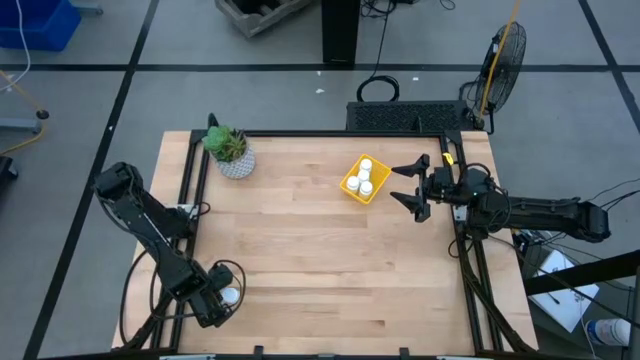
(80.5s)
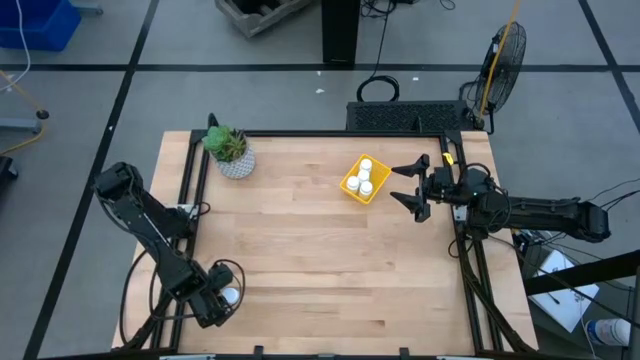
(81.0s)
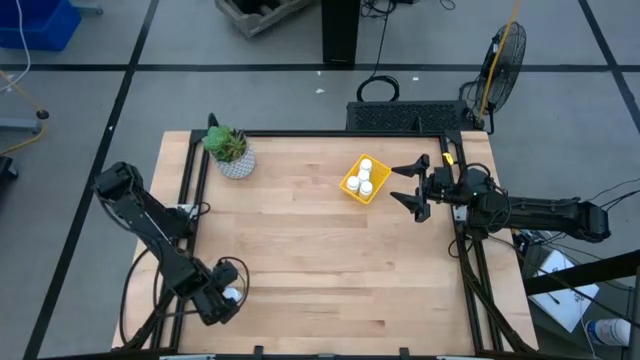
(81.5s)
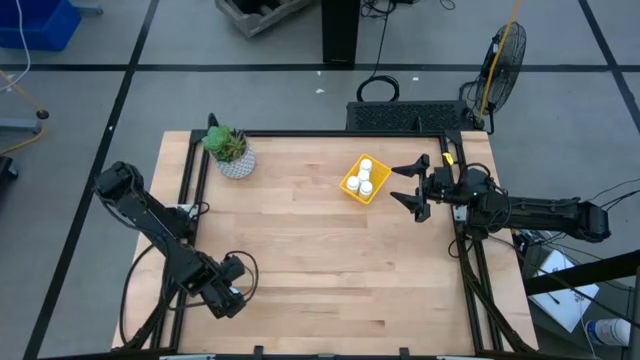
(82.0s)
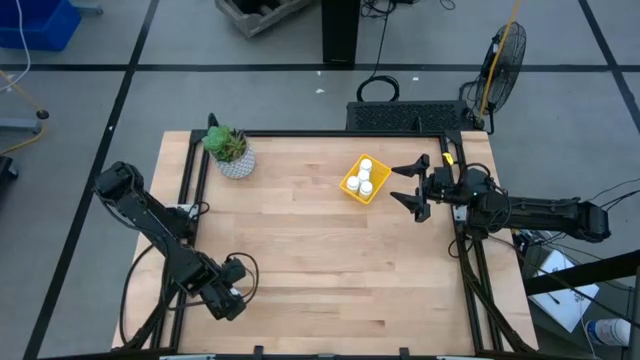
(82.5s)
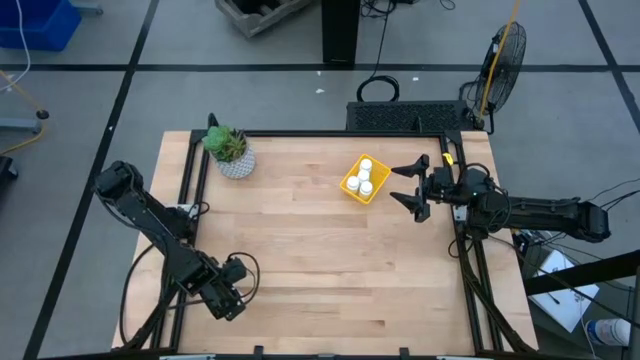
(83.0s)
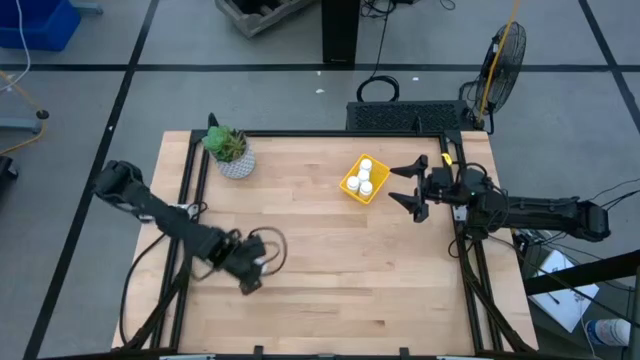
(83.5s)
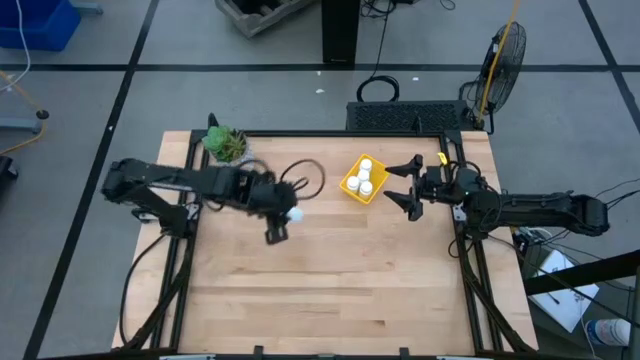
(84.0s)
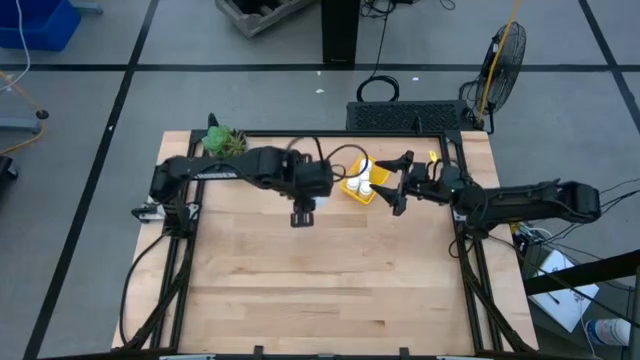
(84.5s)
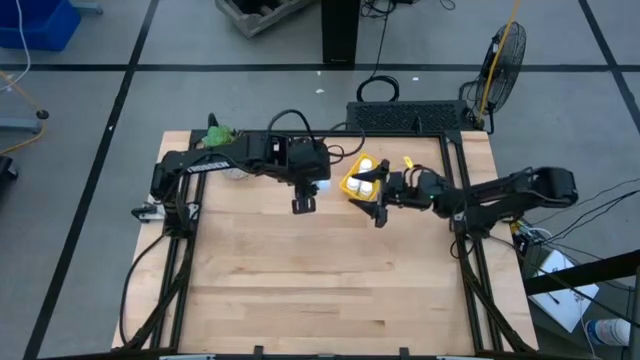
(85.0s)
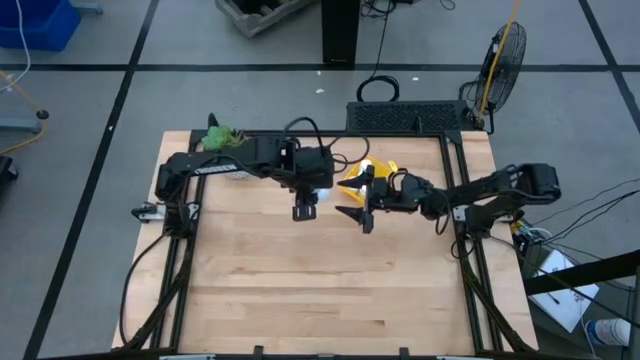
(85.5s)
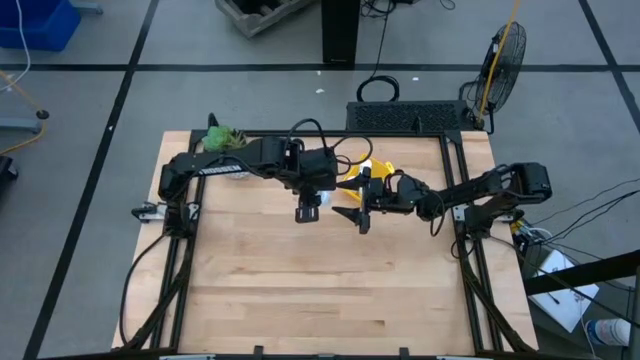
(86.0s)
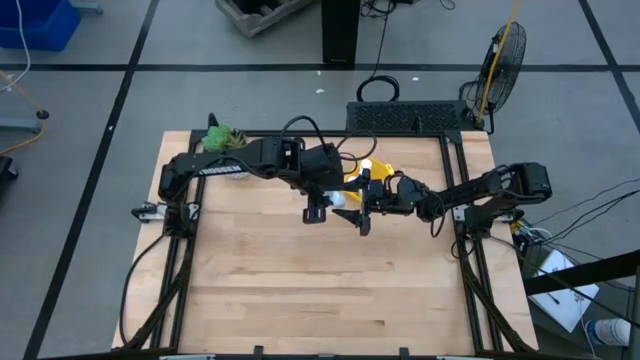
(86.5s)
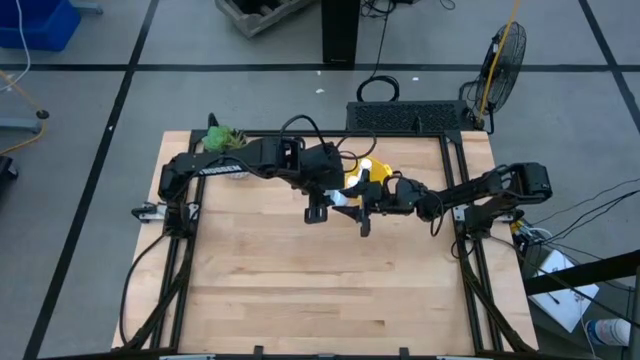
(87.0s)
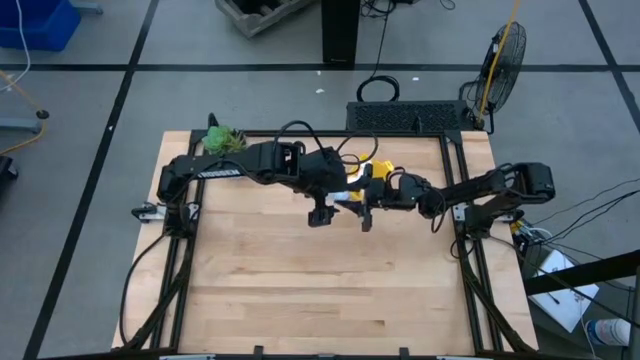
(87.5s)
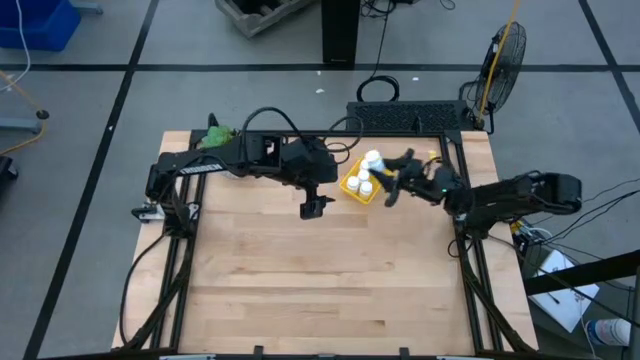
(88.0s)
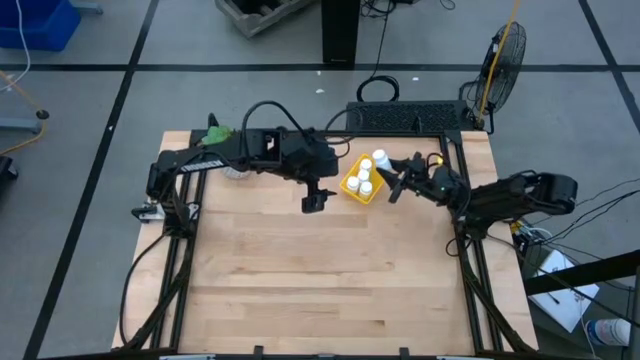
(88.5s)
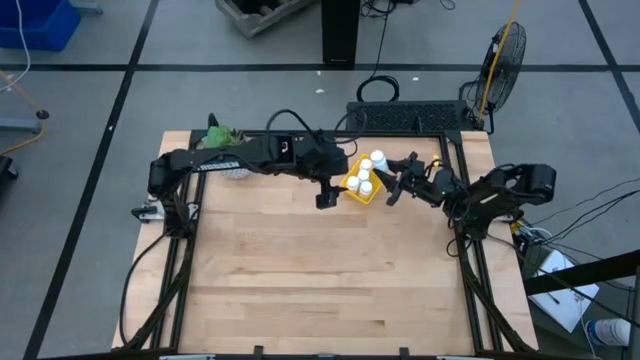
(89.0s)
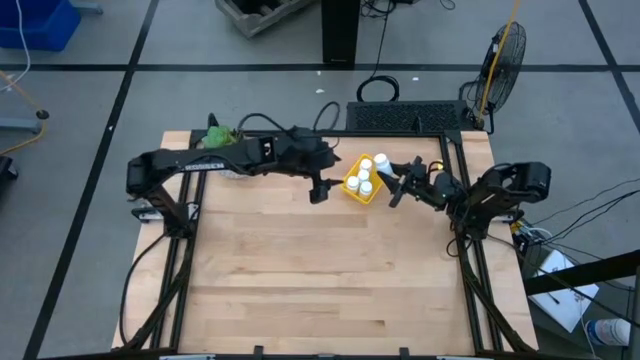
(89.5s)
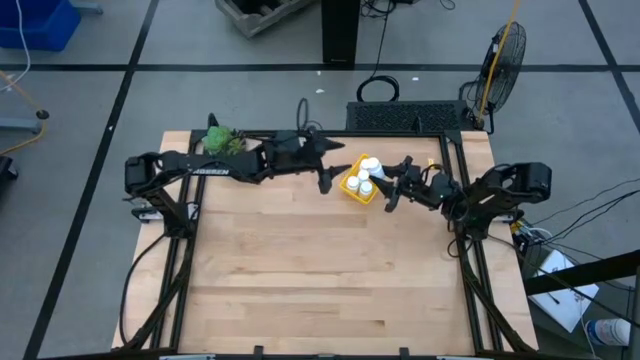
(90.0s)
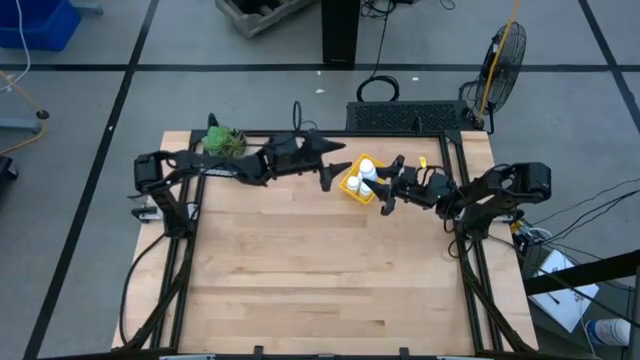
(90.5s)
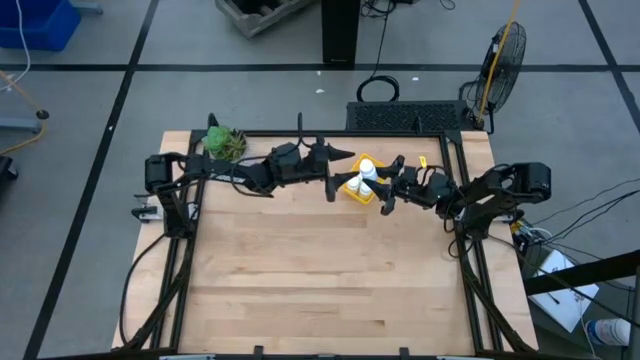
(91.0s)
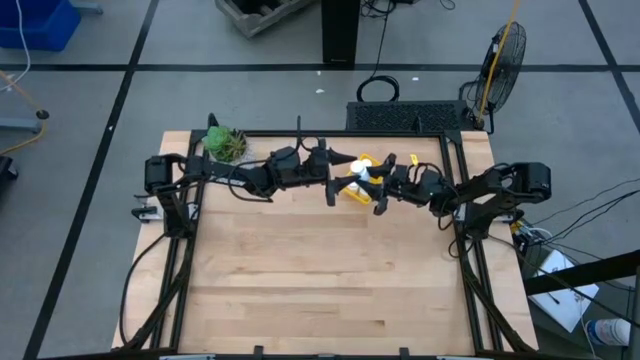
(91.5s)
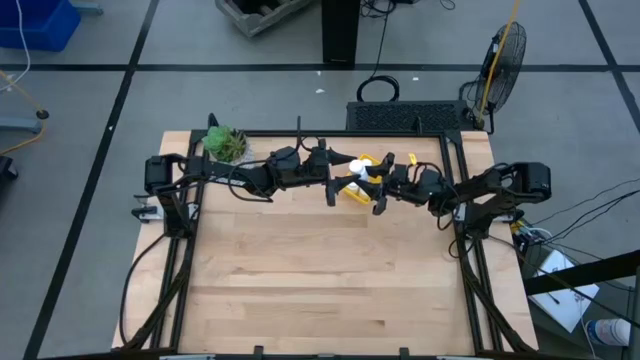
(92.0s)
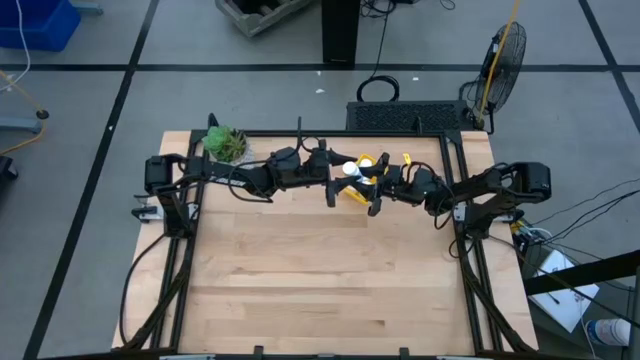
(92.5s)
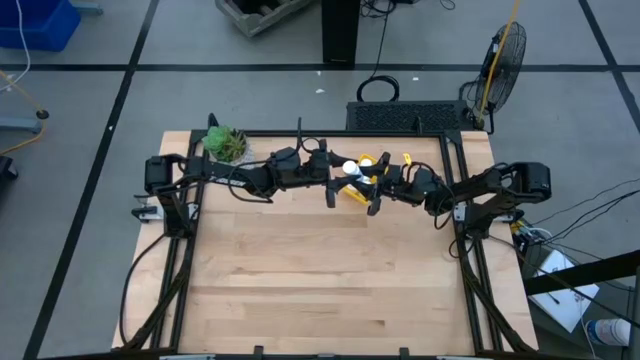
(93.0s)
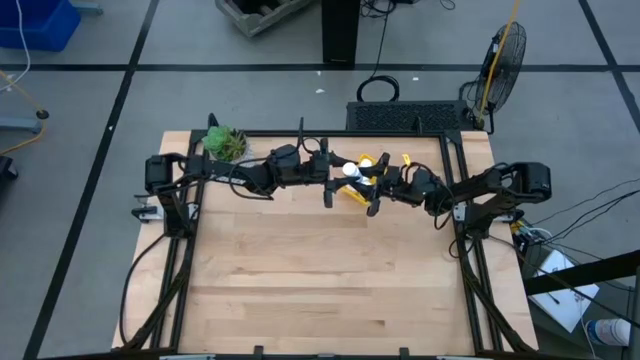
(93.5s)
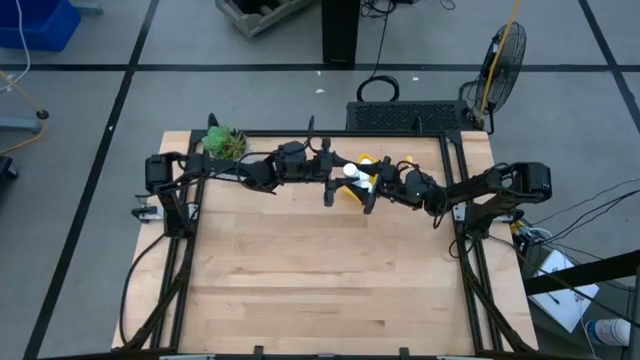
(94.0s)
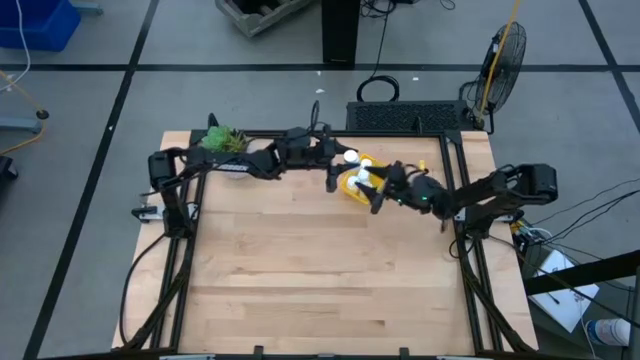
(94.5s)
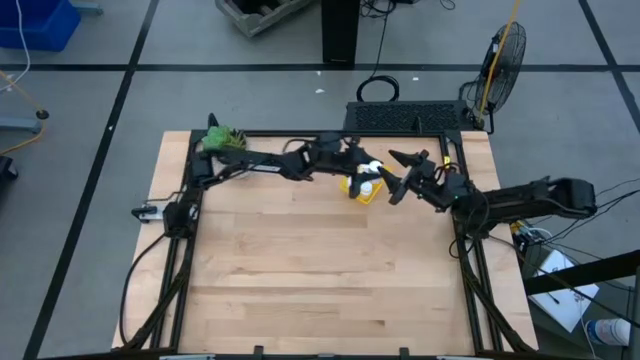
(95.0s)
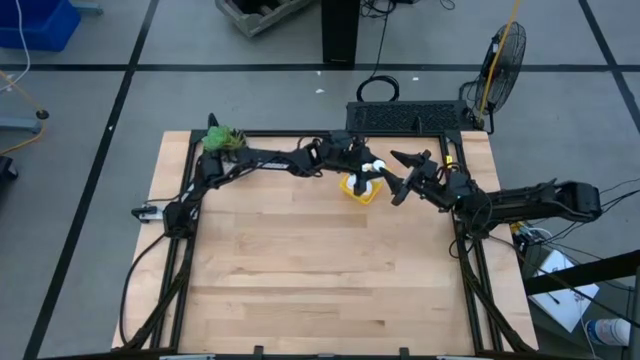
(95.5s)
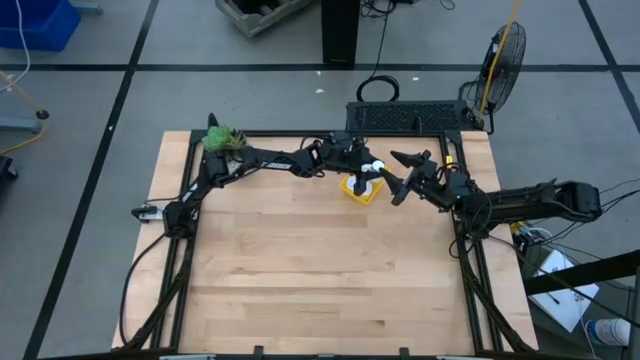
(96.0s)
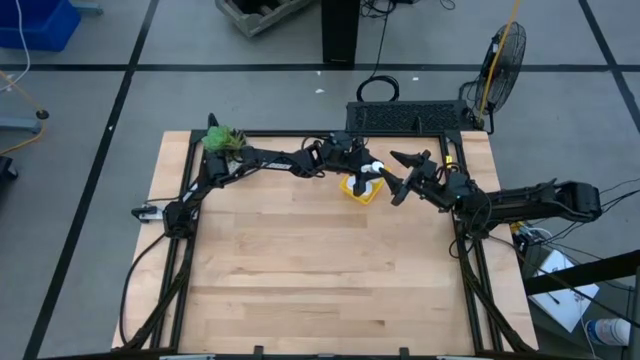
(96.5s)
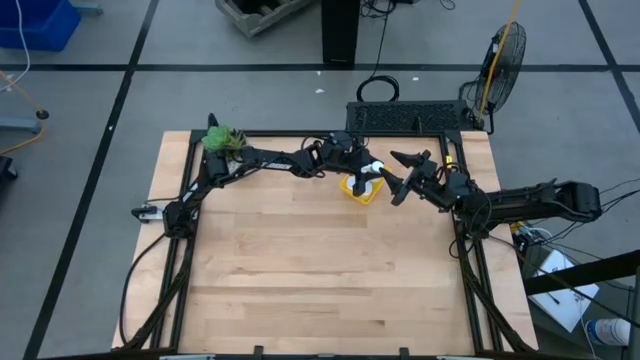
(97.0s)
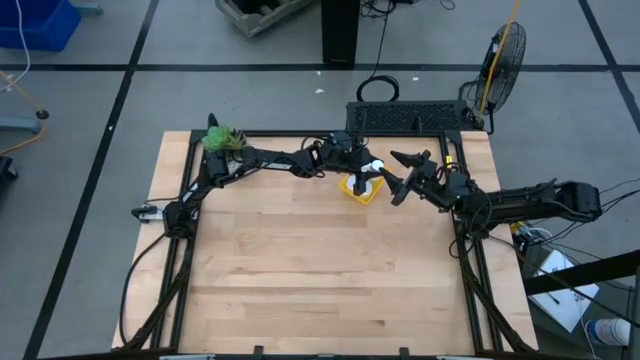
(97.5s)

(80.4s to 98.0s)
Task: Pick and place pill bottles into a basket
Put the white medicine bottle into the yellow bin

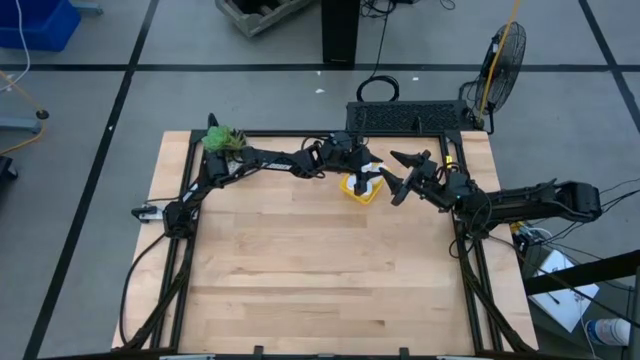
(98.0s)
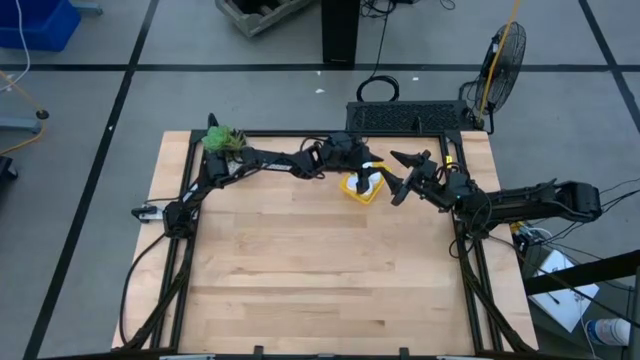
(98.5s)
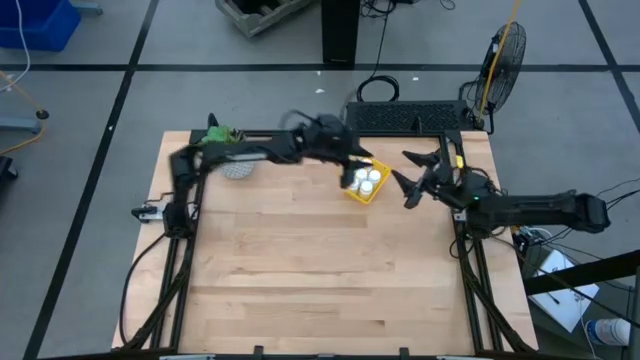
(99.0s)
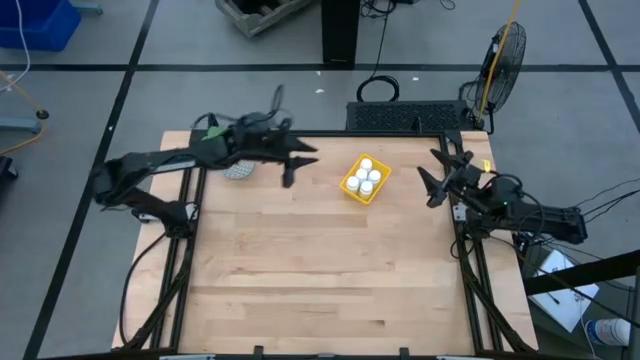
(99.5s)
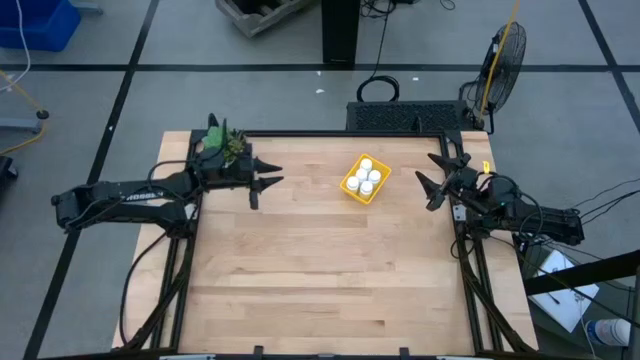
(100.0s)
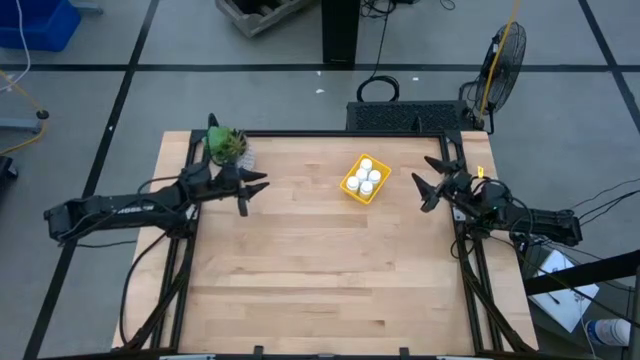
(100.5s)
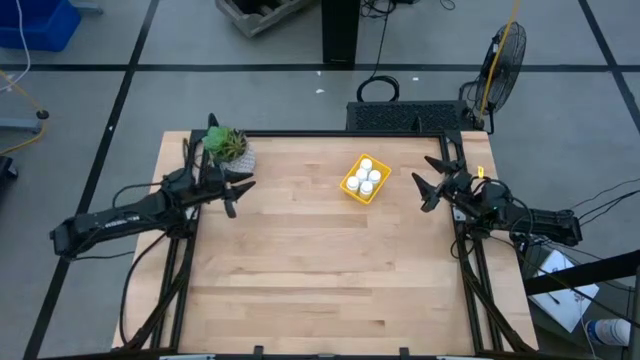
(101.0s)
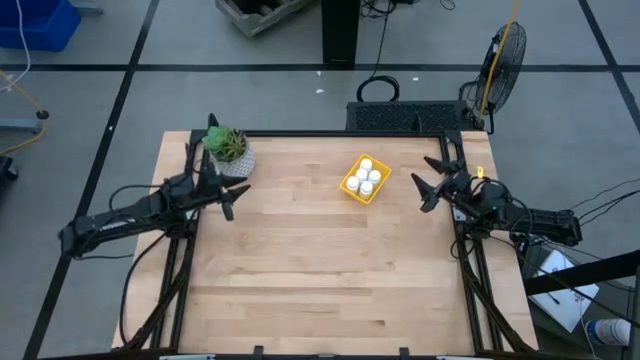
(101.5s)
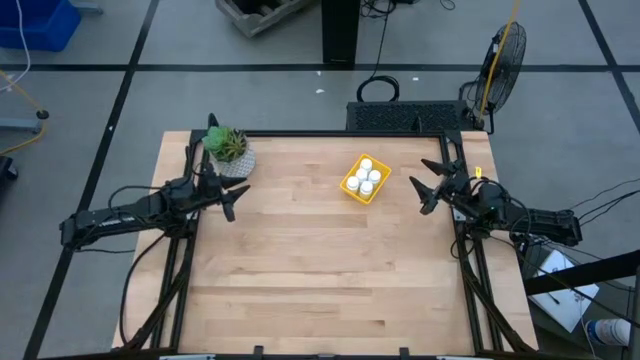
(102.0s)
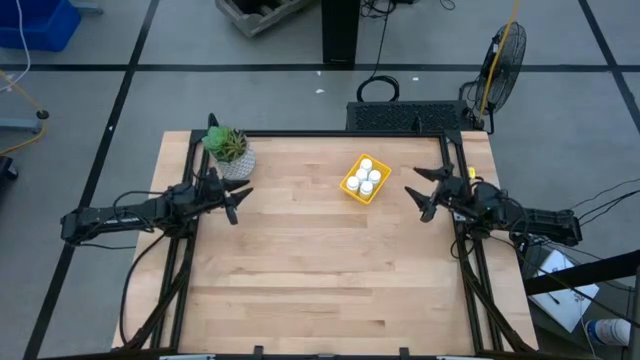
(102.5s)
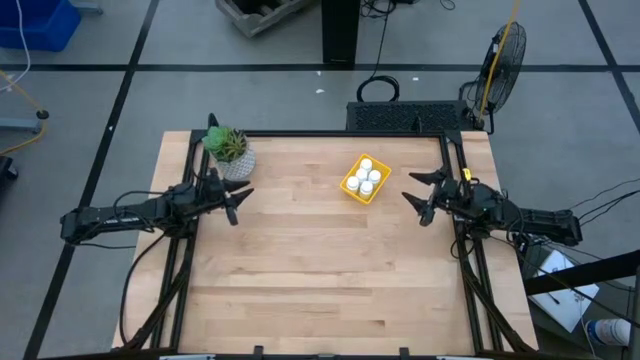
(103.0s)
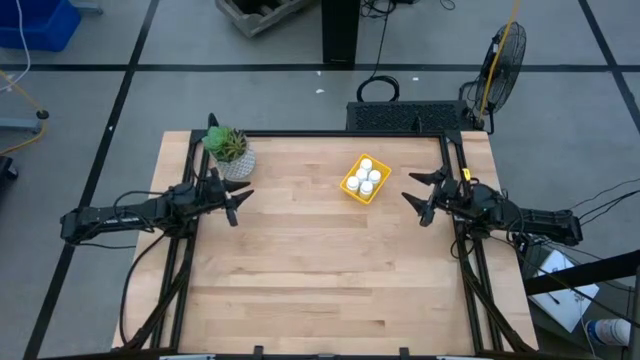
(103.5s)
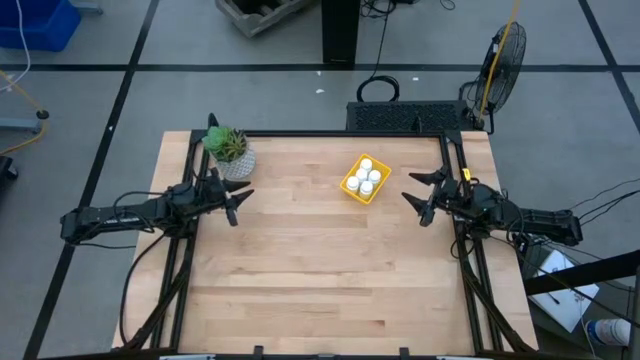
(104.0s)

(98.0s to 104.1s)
Return to Home Position
